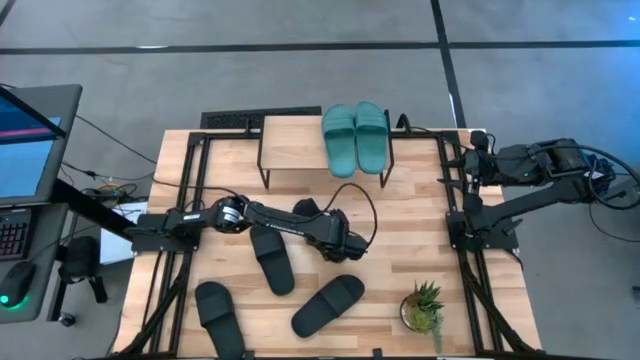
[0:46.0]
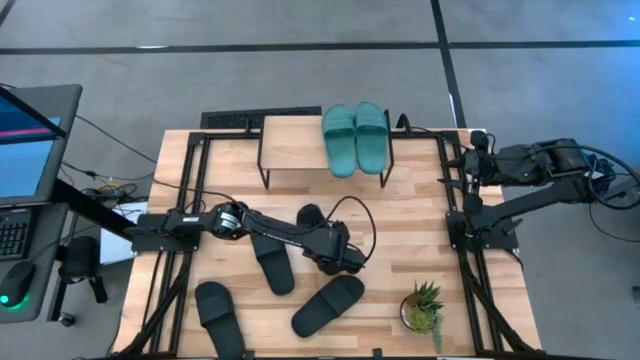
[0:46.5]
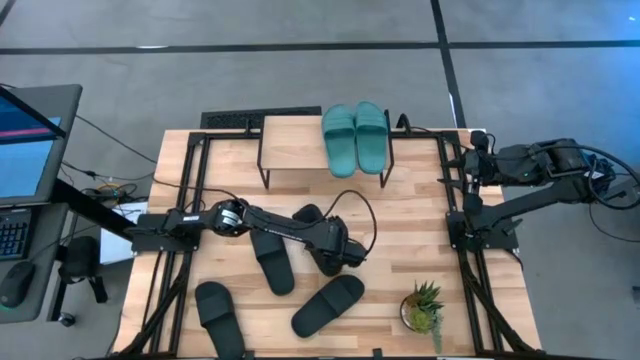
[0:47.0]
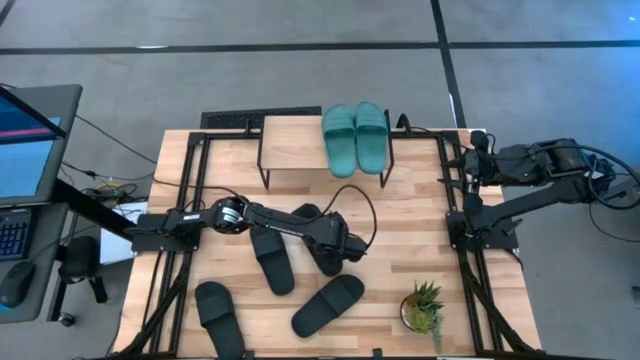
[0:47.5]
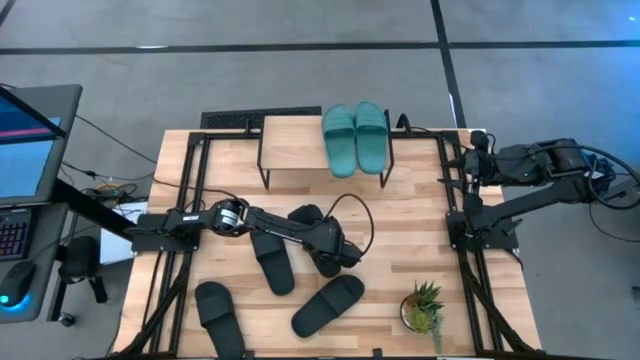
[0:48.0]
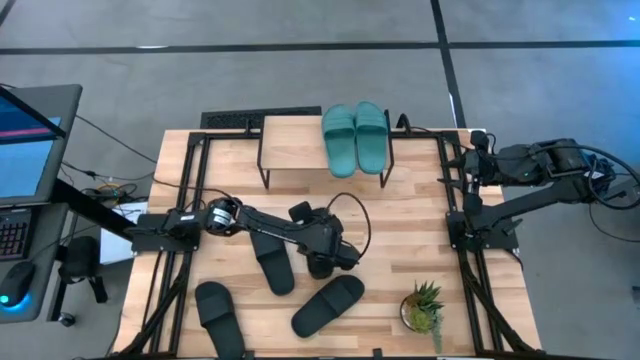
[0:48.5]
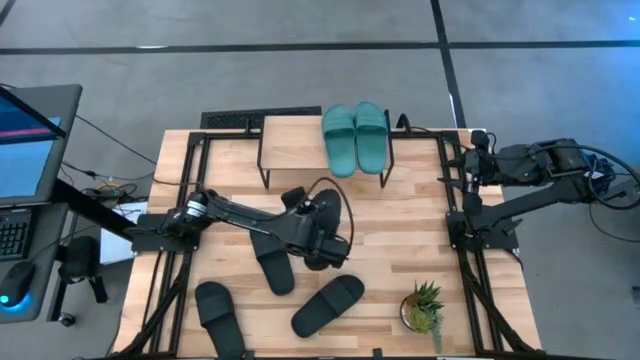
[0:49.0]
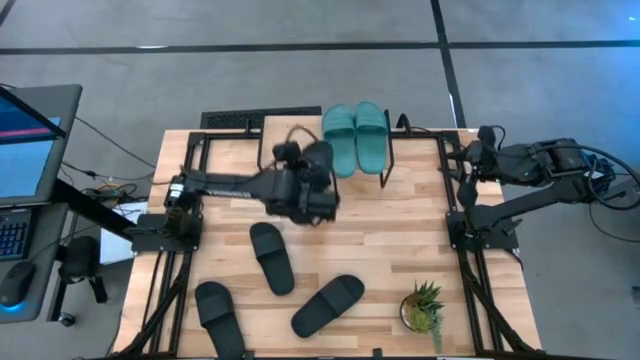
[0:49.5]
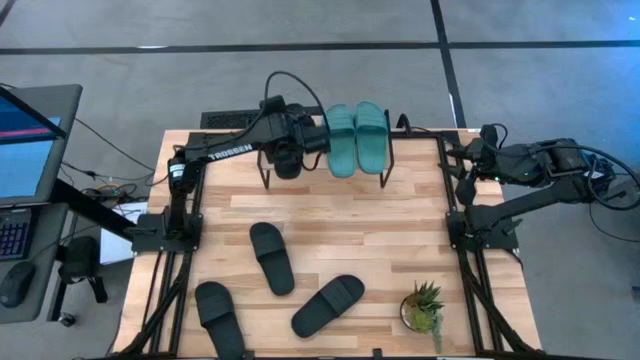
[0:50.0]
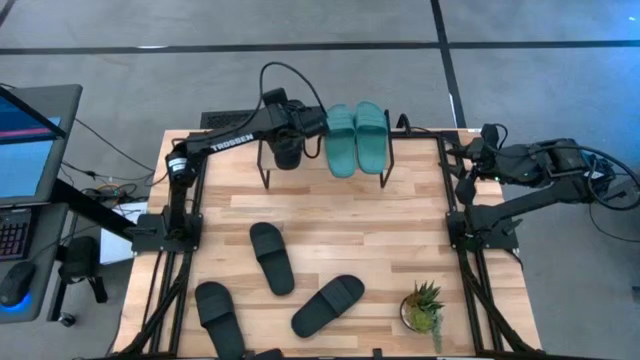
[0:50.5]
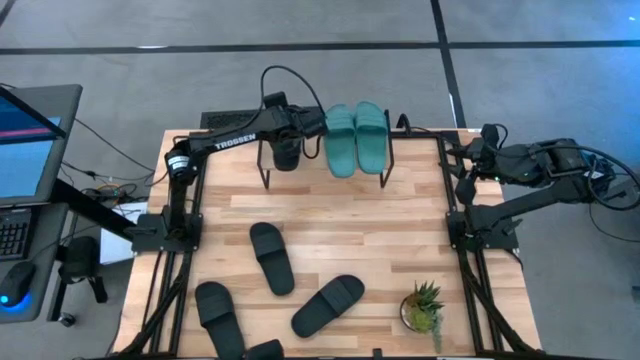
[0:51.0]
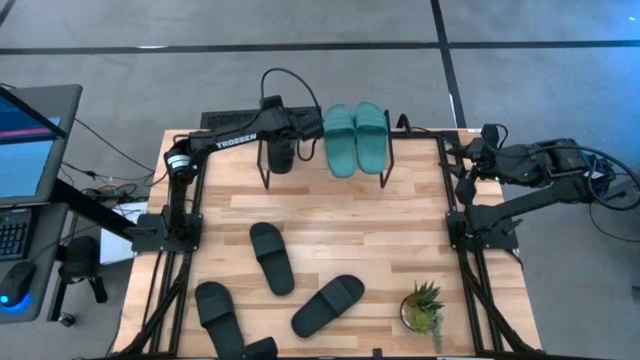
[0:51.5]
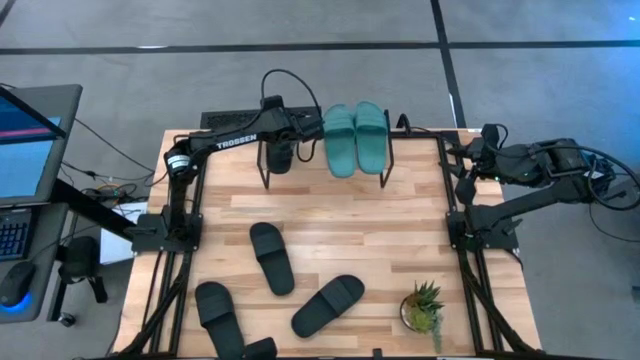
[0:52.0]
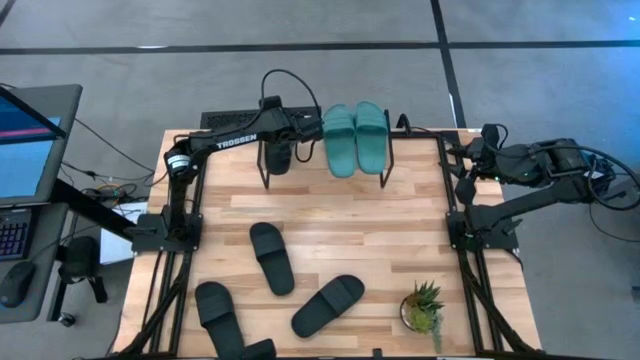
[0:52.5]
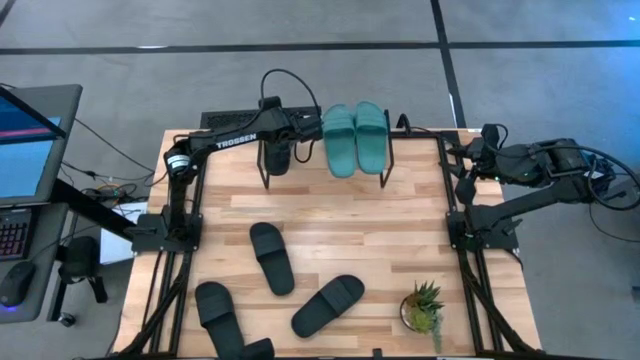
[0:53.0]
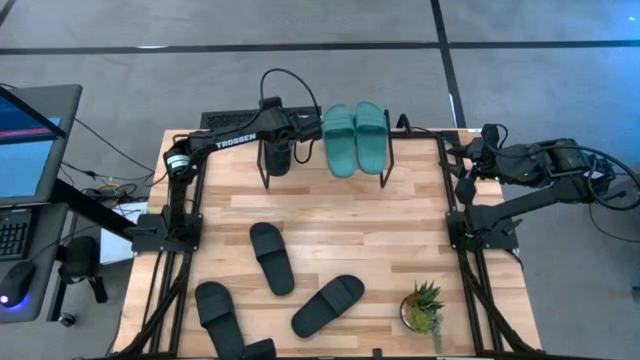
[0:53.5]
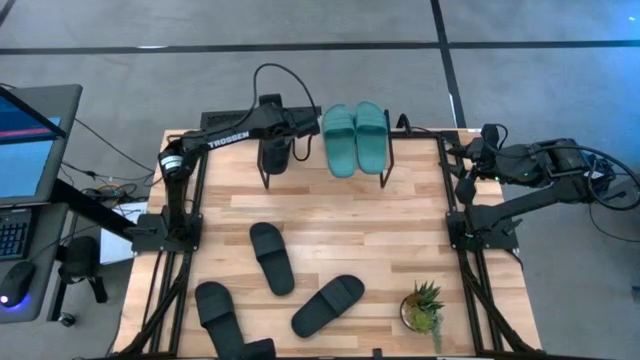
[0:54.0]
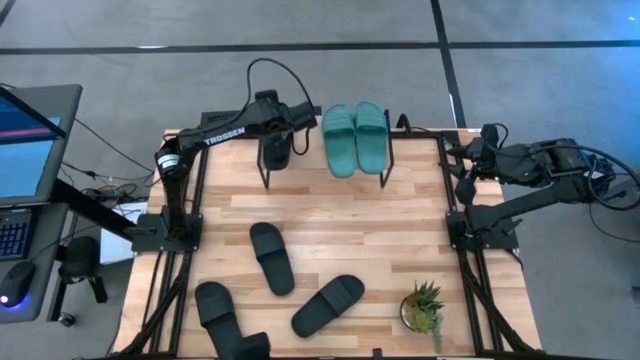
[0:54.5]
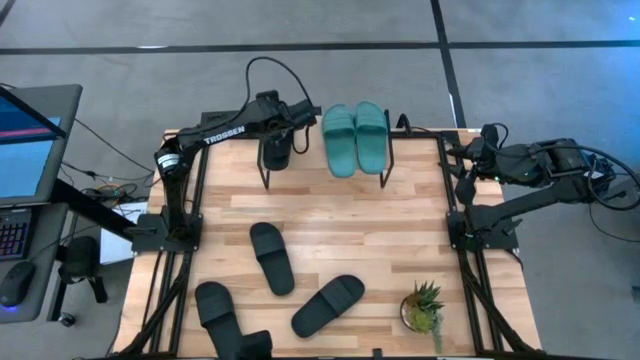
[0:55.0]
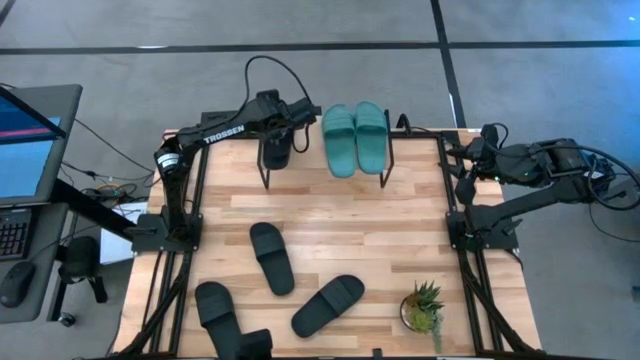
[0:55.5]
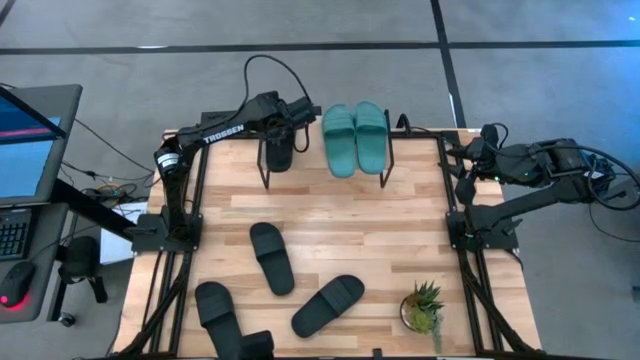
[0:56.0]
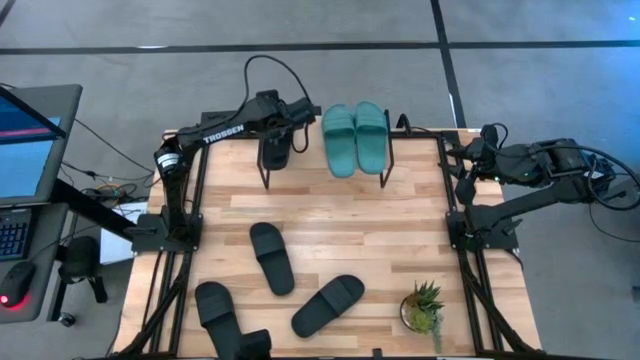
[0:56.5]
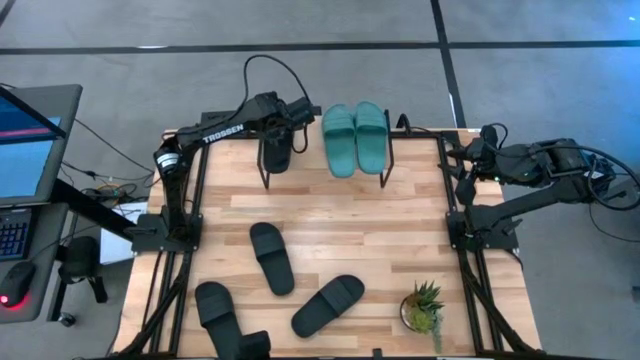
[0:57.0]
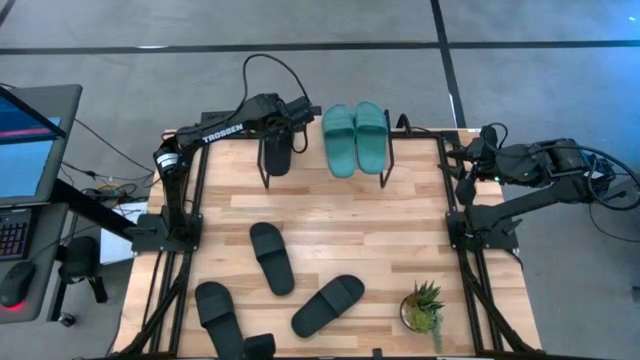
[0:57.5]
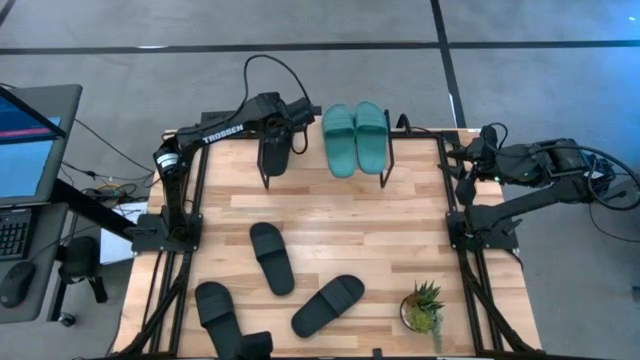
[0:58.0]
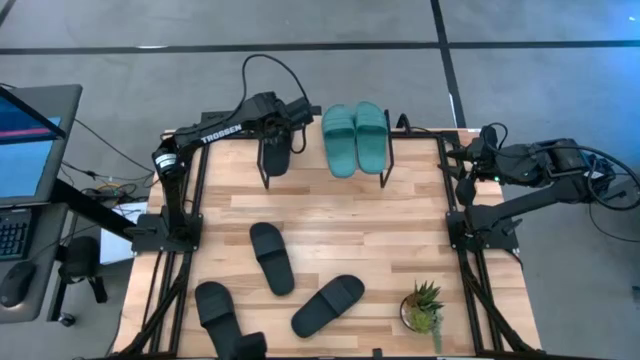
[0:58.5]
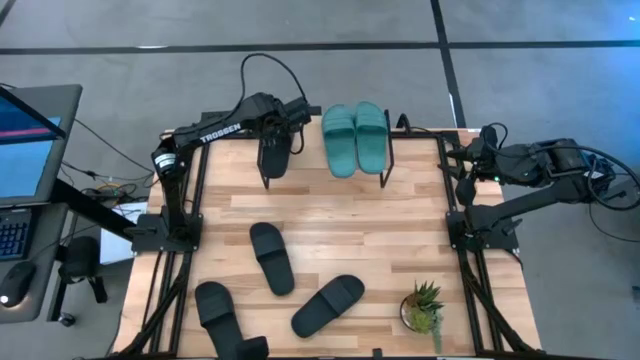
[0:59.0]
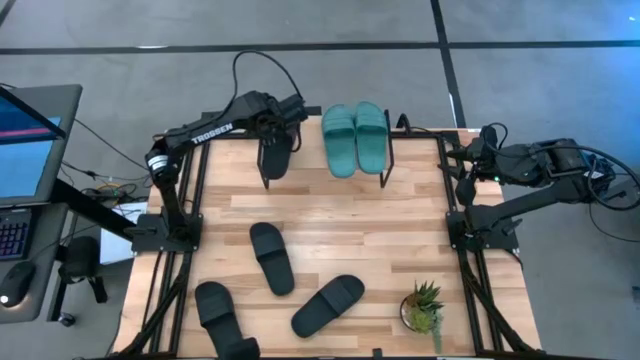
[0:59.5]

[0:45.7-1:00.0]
Task: Pick and place slides into the shelf
Put the black slipper on the shelf

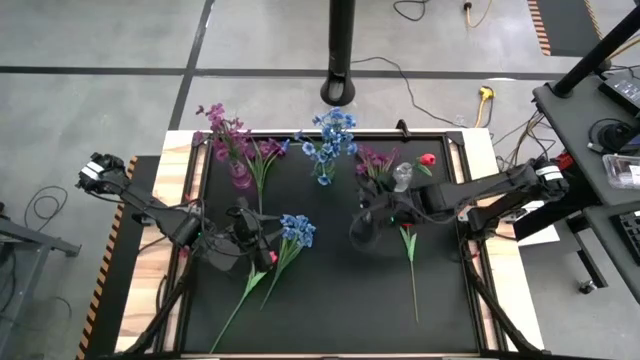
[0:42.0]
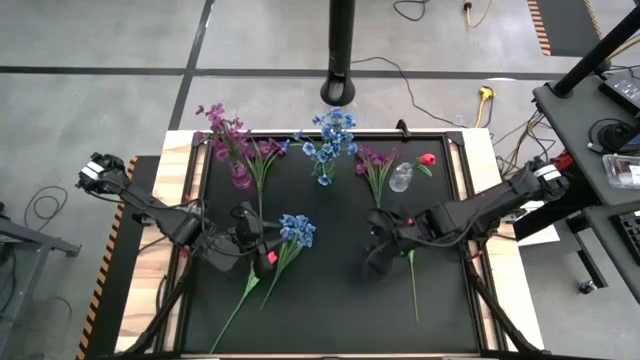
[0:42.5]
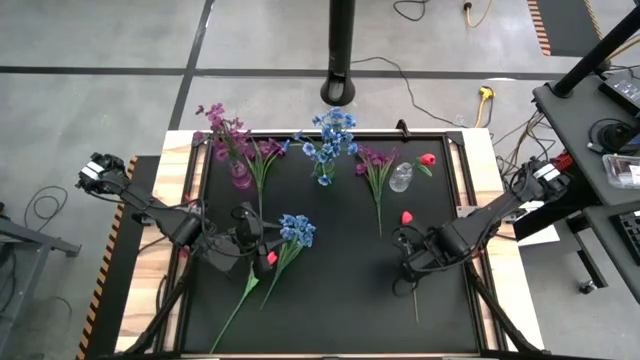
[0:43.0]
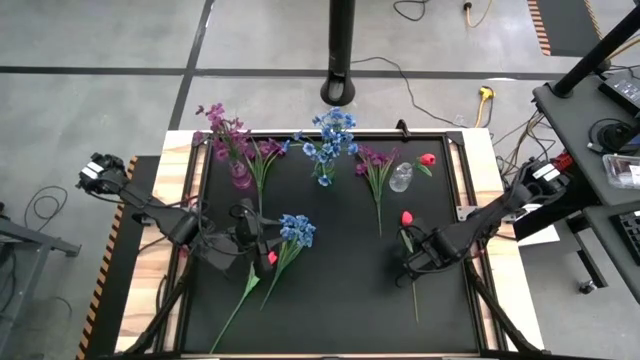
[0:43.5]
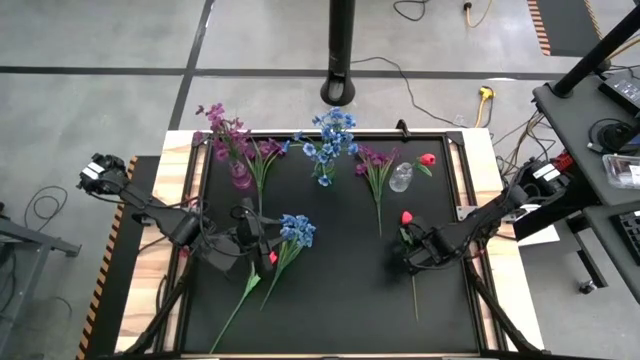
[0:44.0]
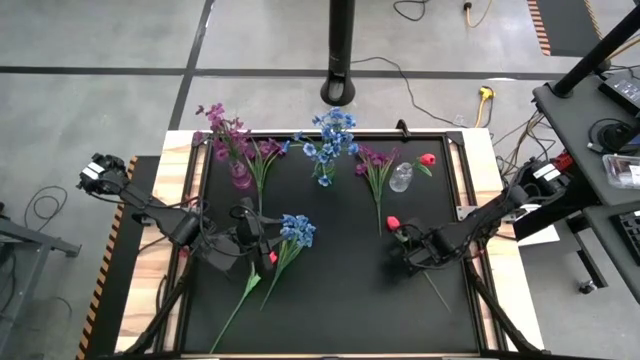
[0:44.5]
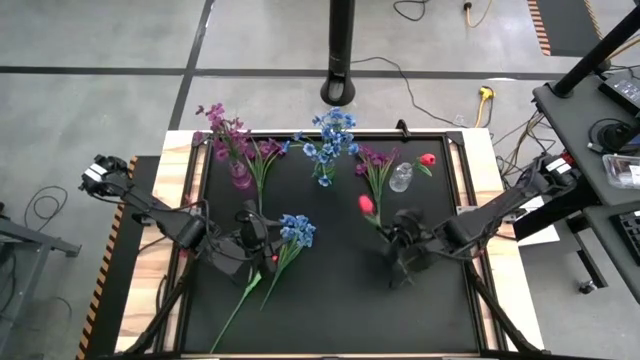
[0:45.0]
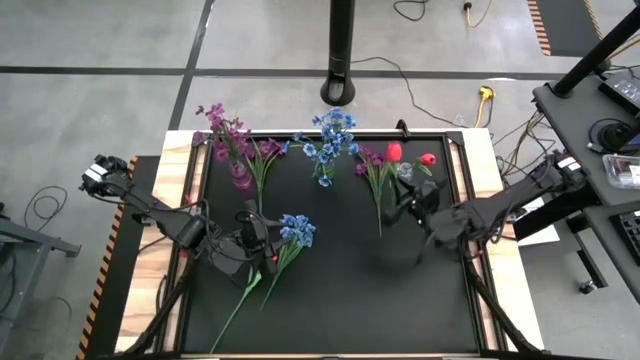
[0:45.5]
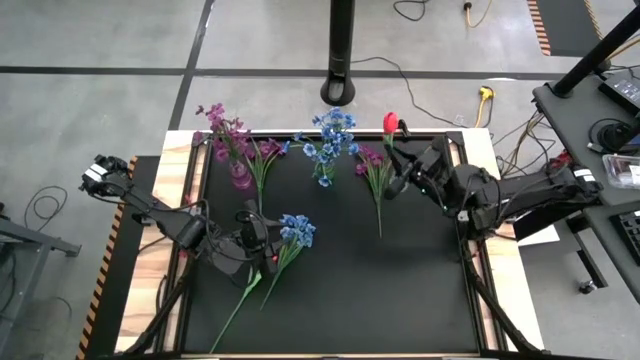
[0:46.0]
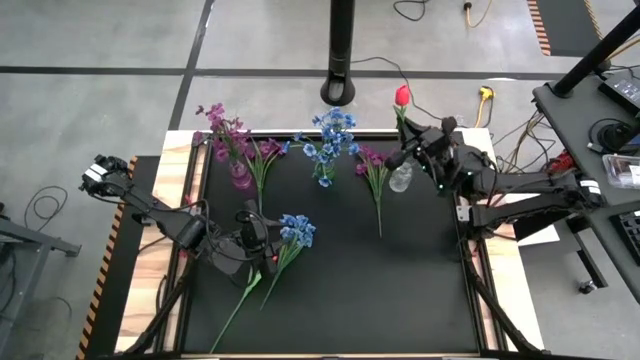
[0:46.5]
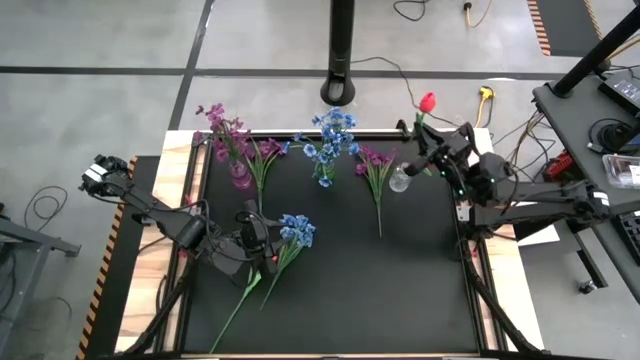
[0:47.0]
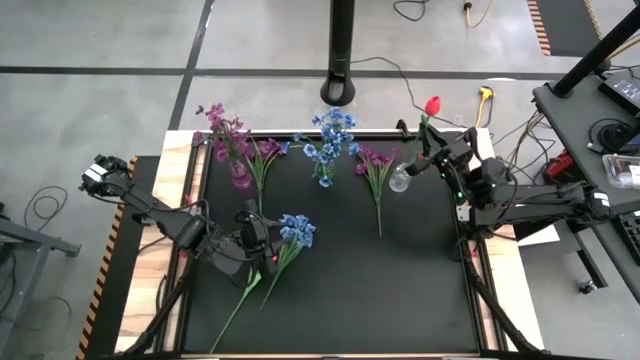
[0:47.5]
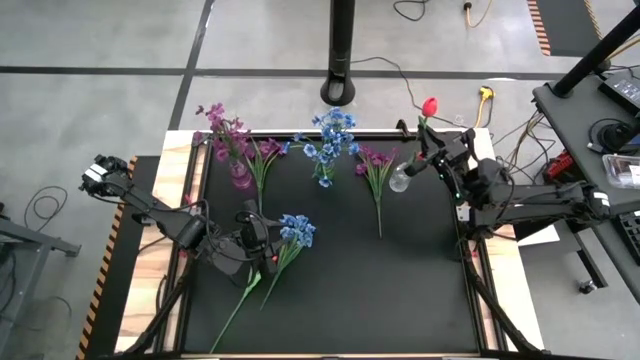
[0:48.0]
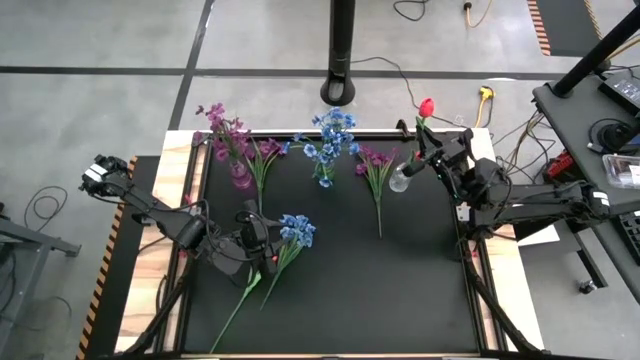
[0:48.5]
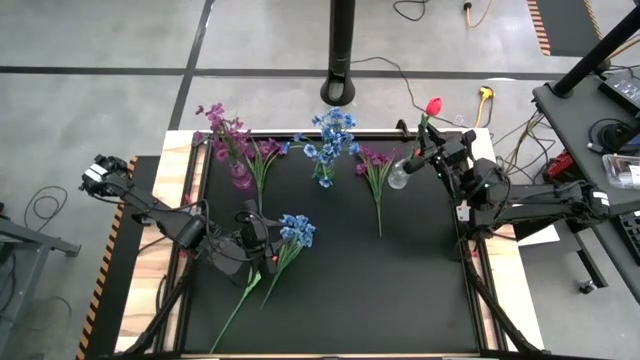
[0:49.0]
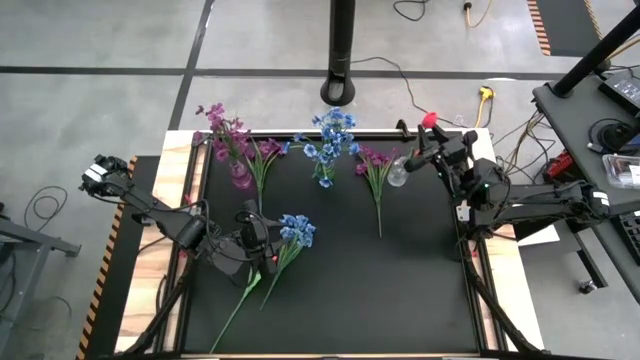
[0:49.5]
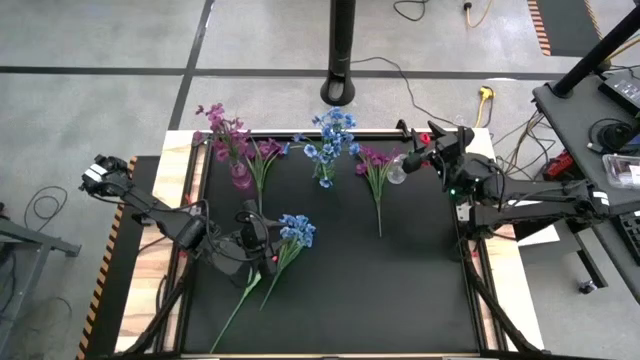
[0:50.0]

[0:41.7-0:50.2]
Task: Sort flowers into vase by color
Put the right red tulip into the transparent vase
